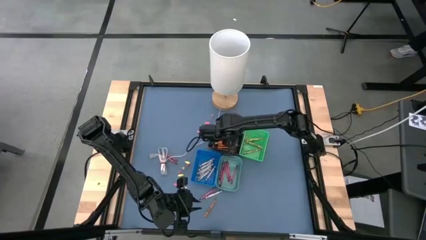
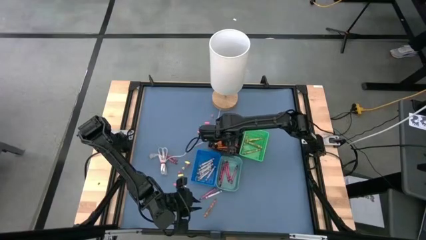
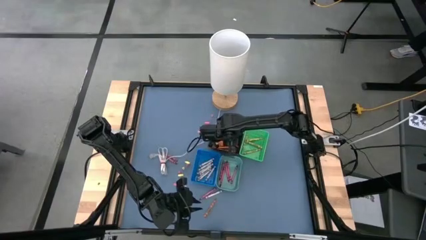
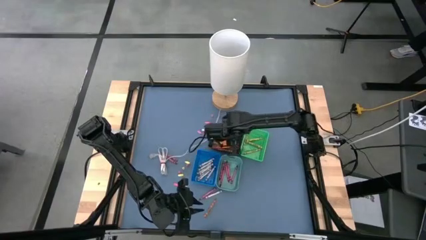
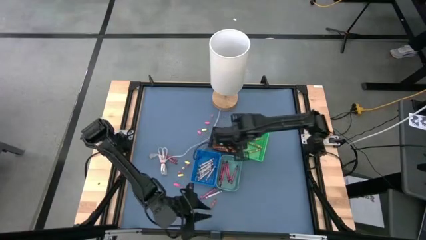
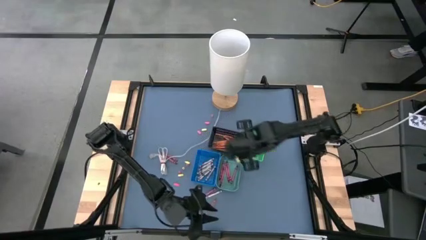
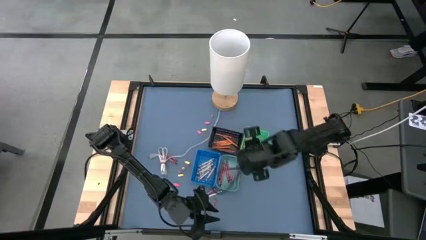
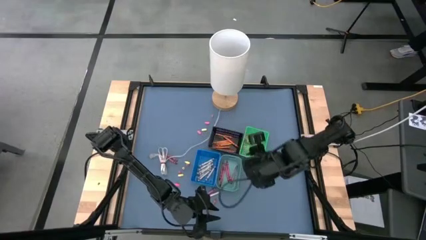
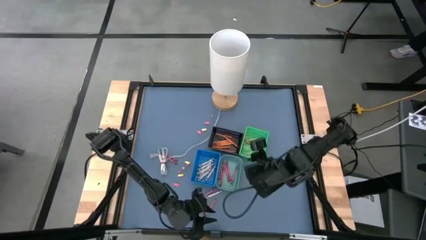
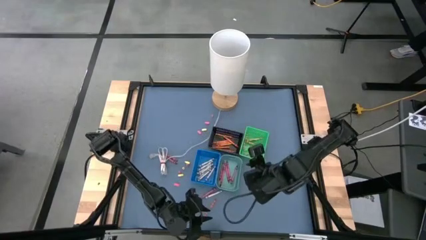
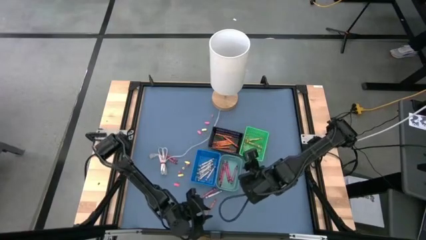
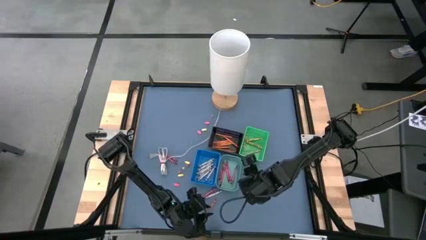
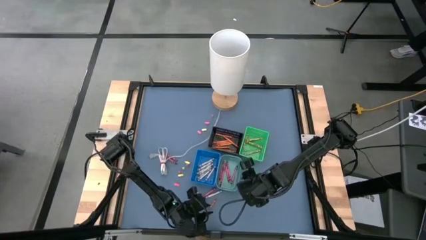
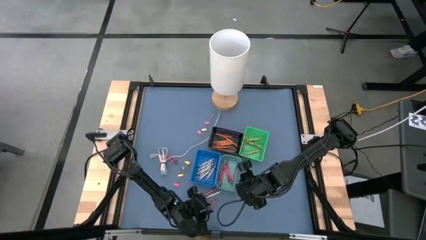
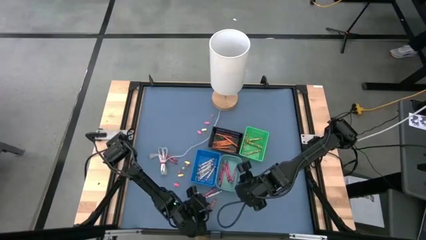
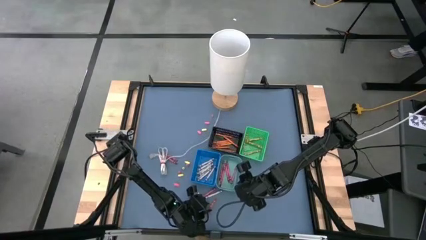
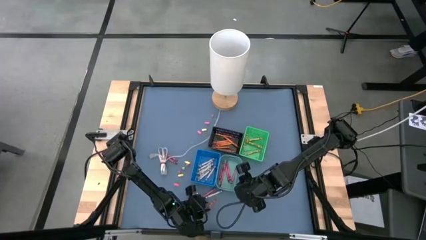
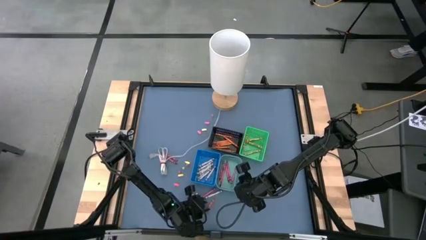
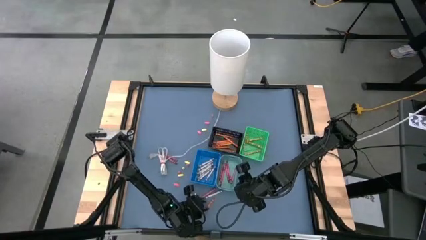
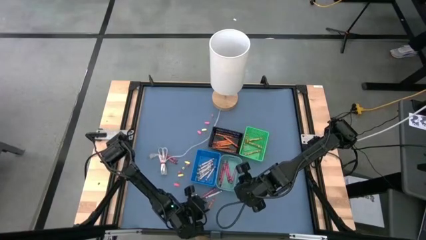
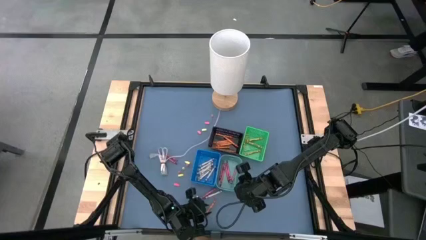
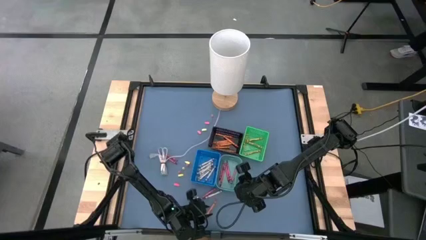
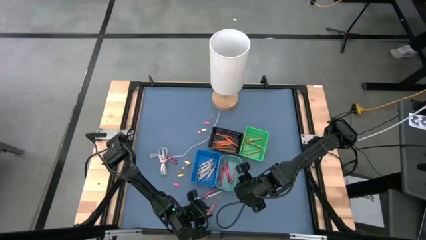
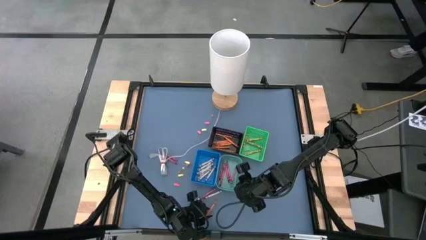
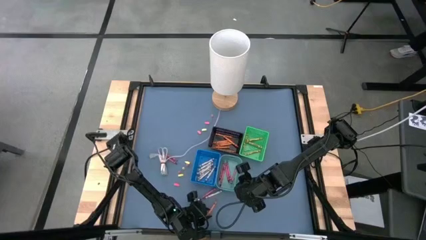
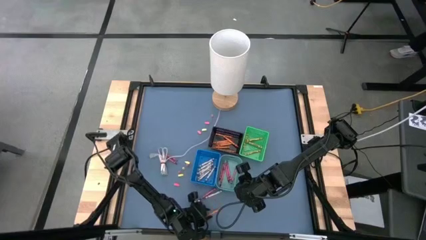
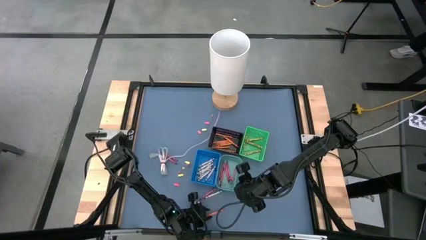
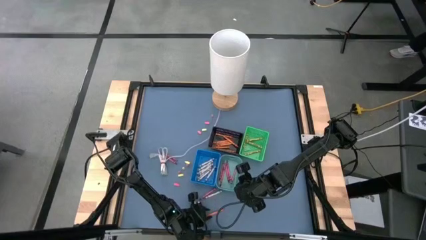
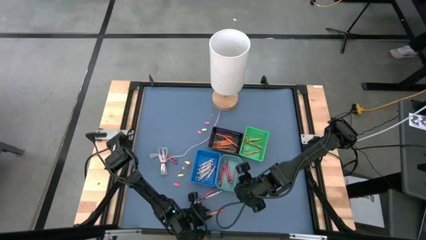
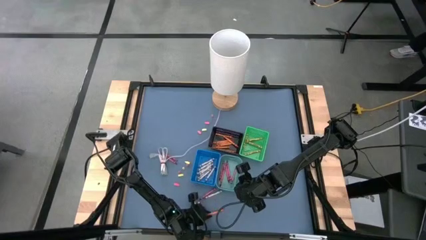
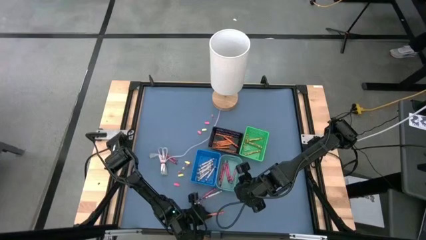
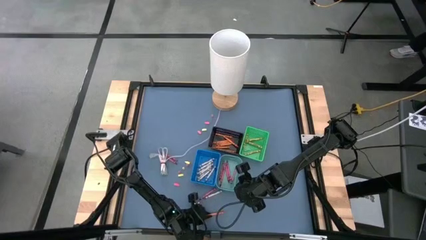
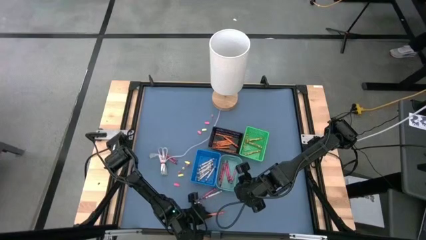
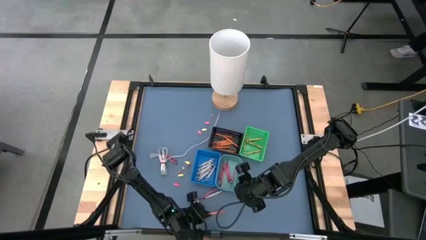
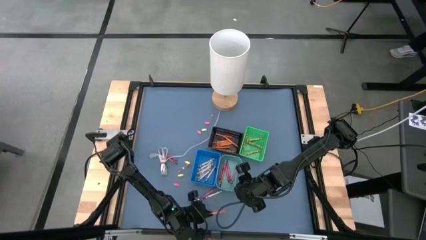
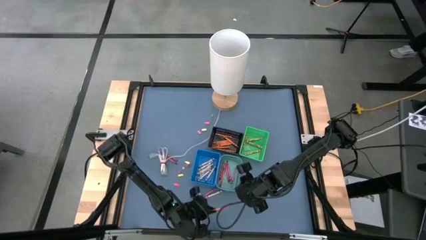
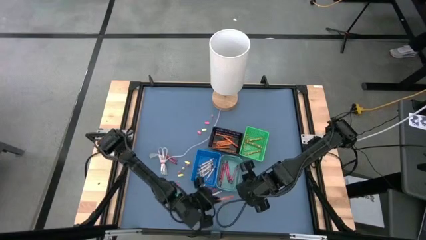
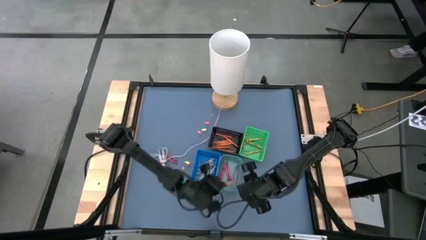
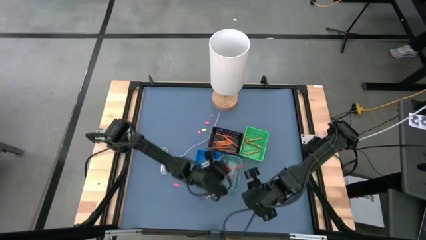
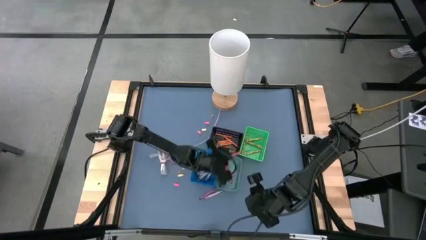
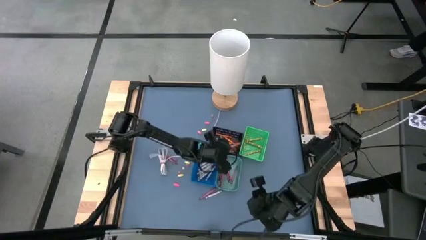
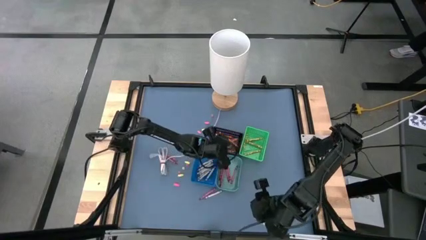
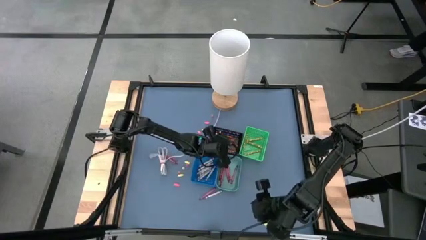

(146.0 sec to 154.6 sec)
Task: Sort crayons
Put the orange crayon into the black bin

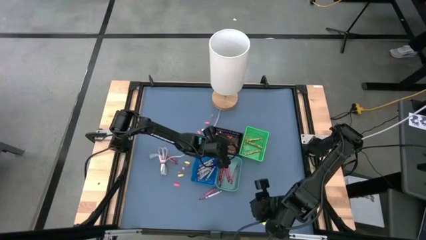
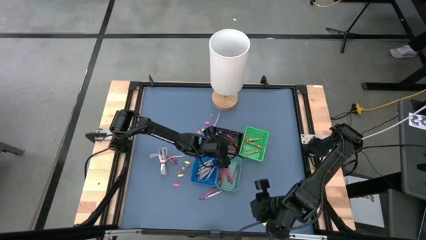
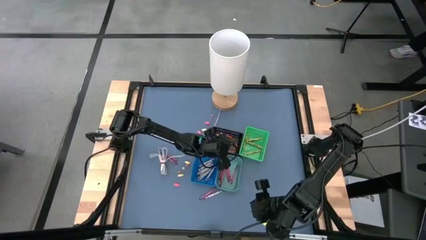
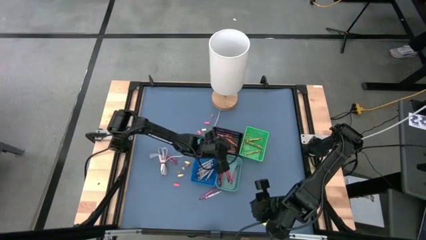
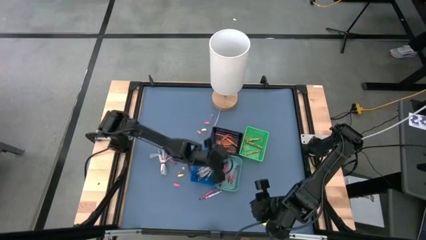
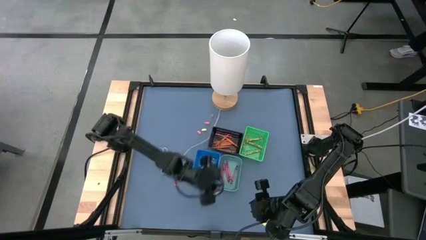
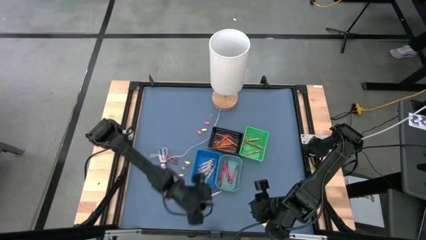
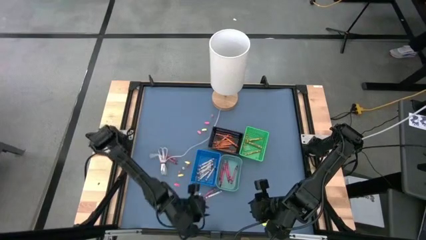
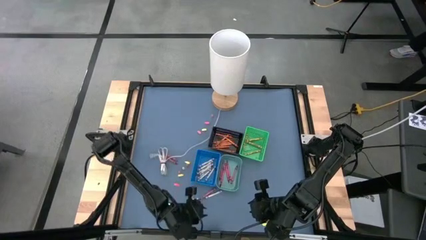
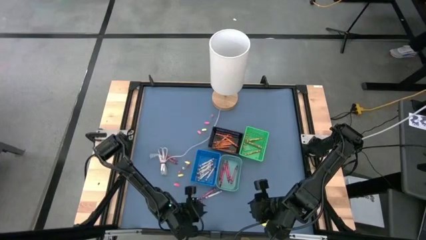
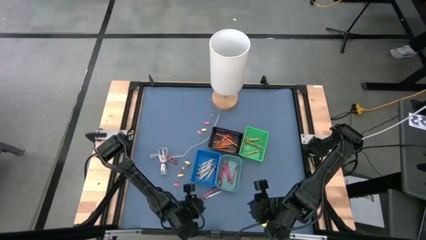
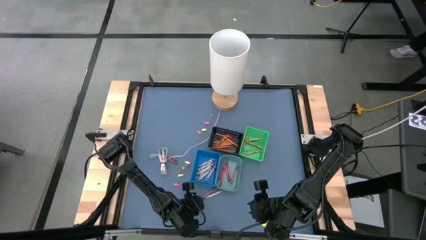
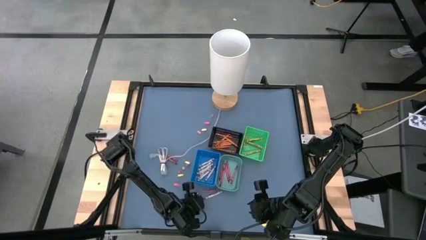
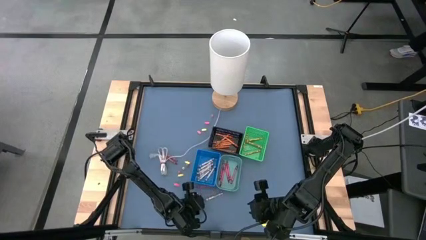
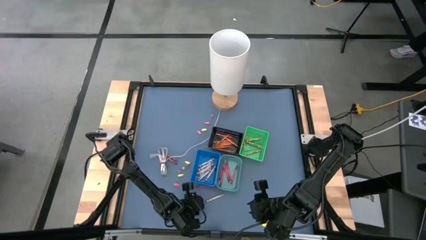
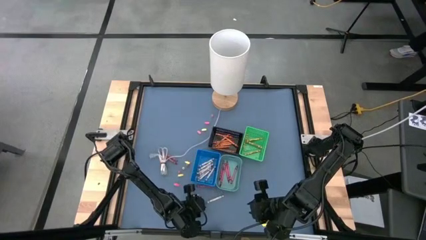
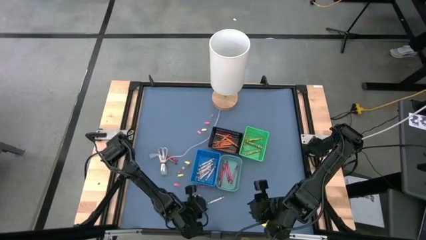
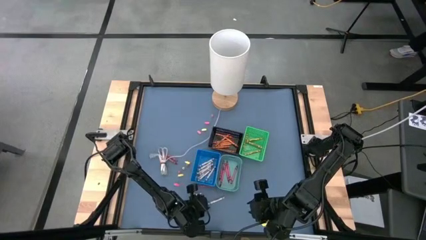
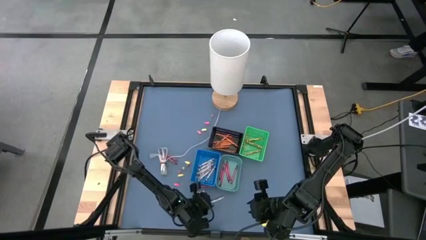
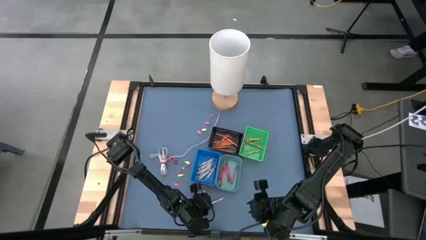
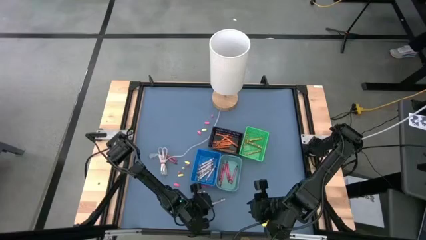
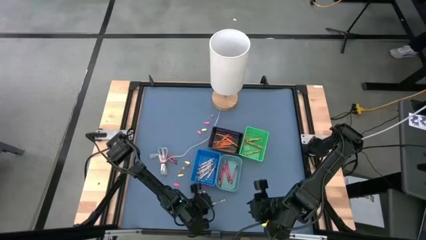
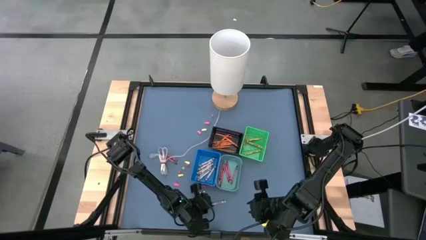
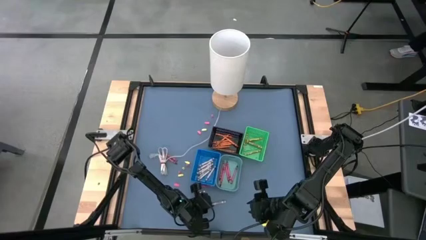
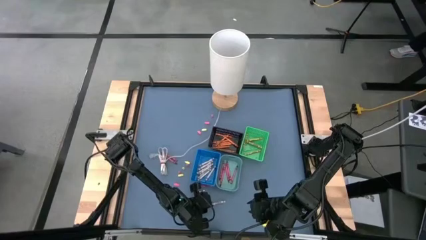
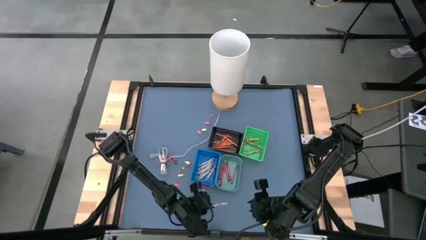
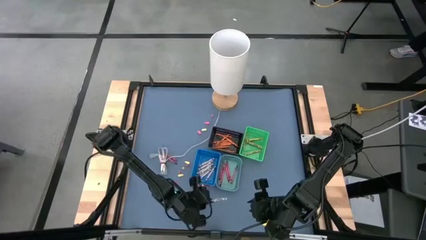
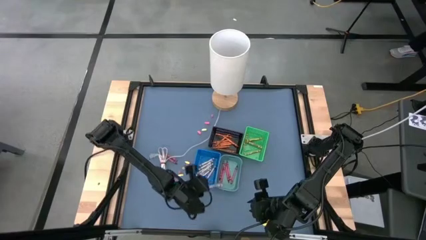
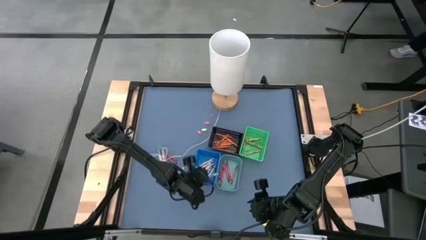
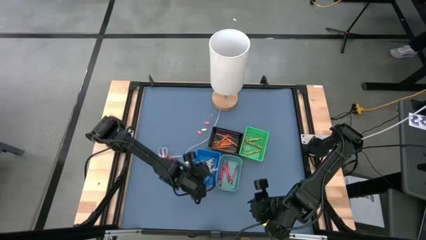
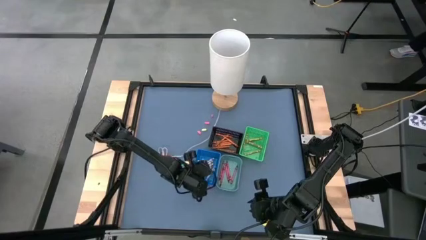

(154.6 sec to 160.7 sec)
Put the gray crayon into the blue bin

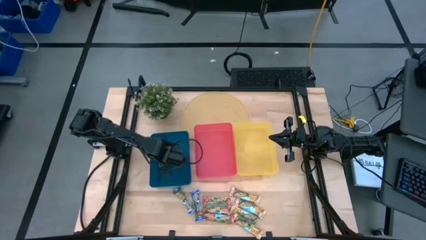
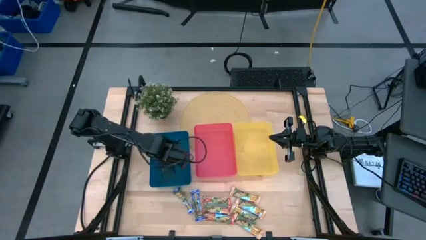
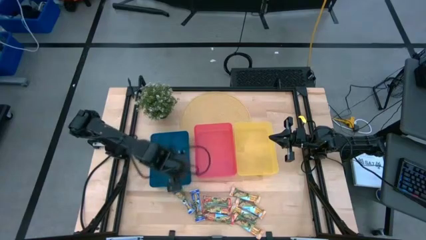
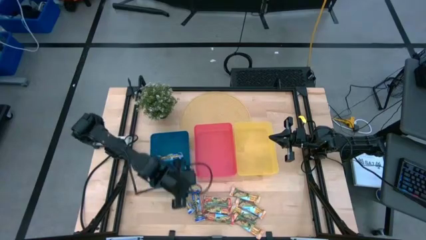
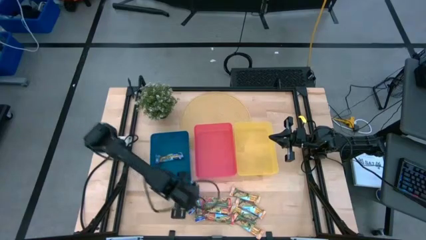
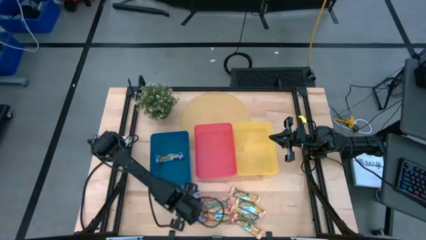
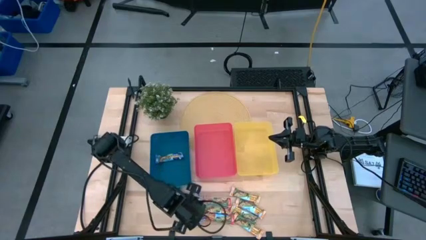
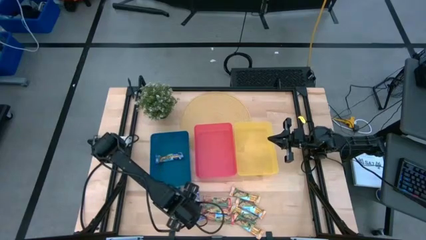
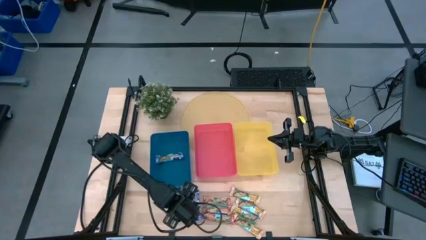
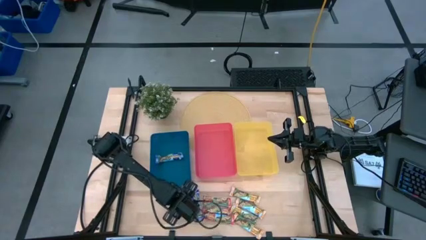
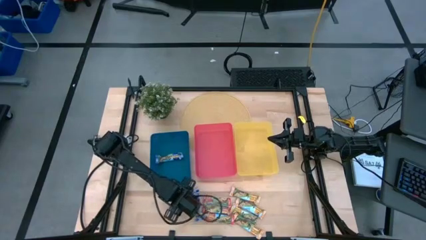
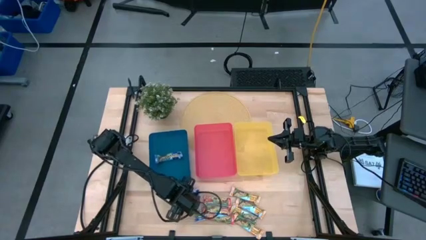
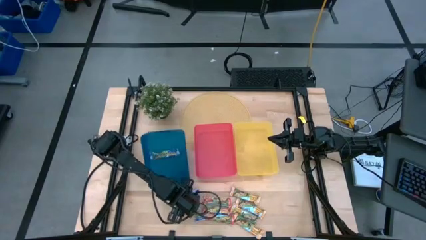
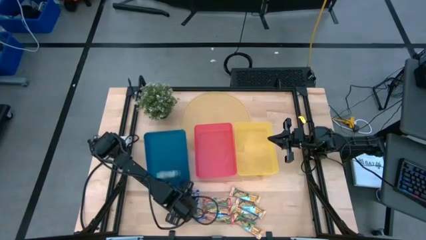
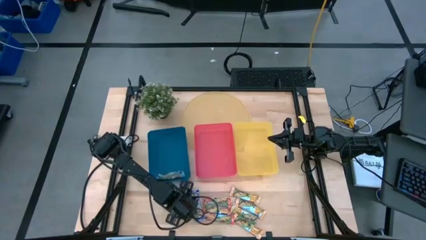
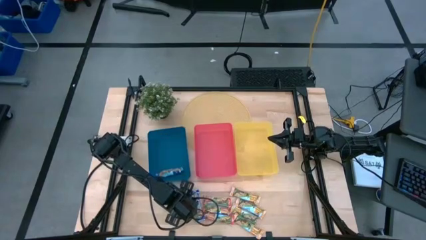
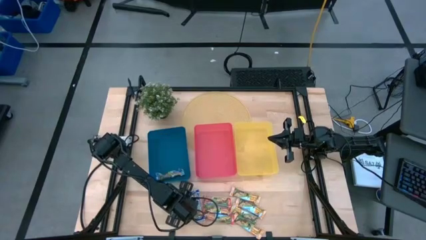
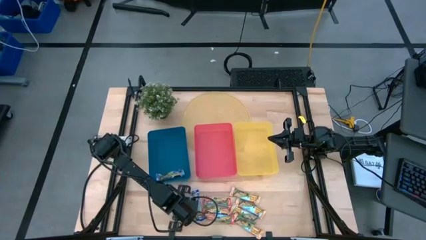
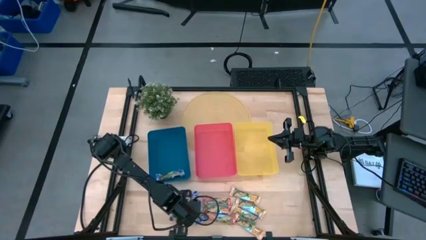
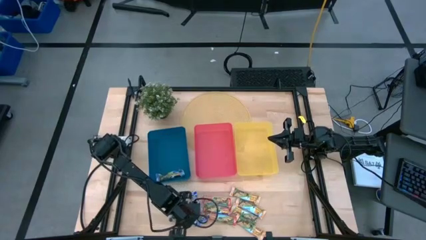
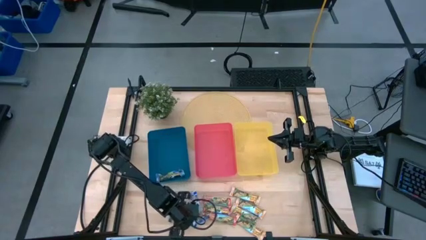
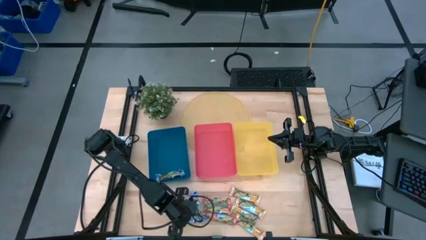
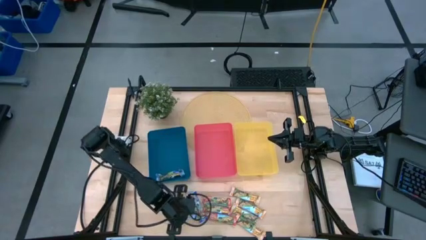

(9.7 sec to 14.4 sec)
Task: Pick and place Granola Bars by type
Put the blue granola bar into the blue bin
